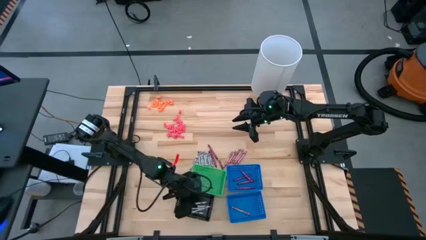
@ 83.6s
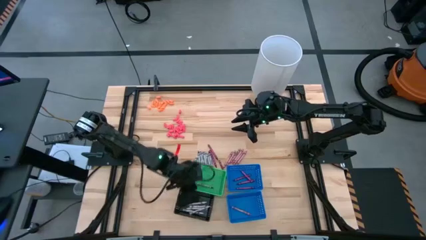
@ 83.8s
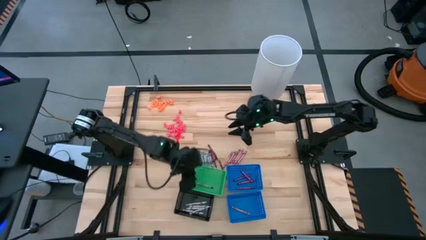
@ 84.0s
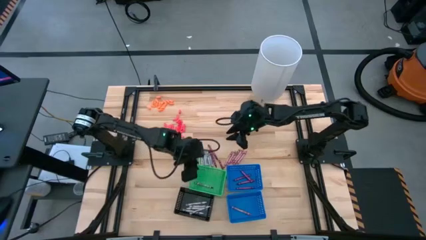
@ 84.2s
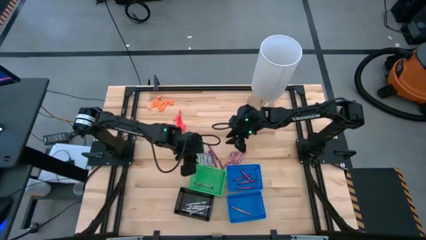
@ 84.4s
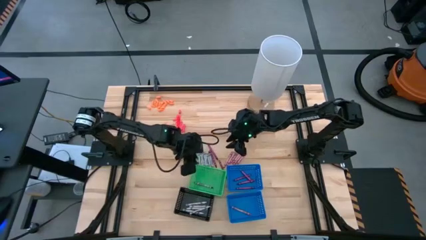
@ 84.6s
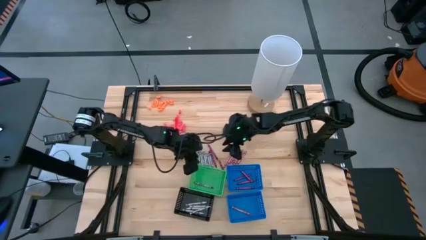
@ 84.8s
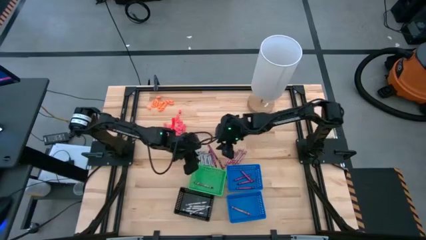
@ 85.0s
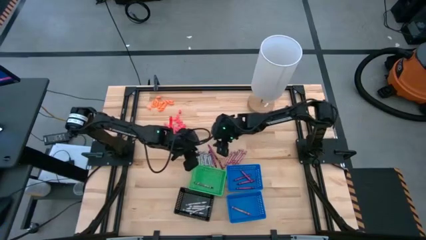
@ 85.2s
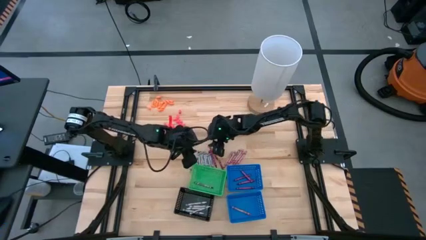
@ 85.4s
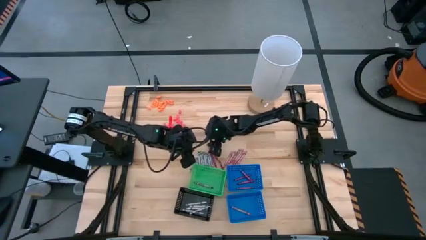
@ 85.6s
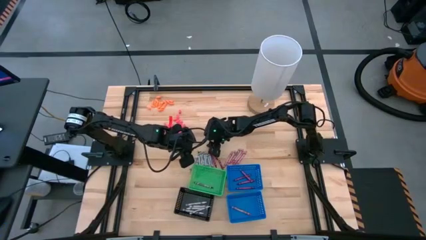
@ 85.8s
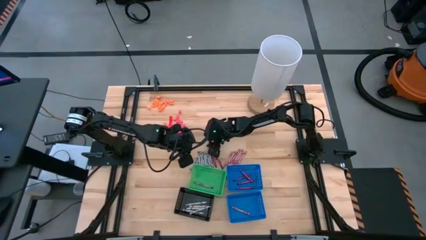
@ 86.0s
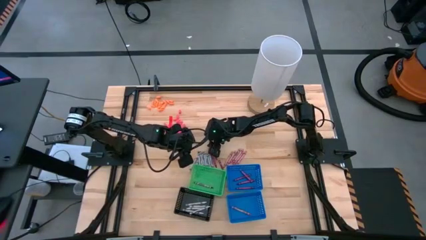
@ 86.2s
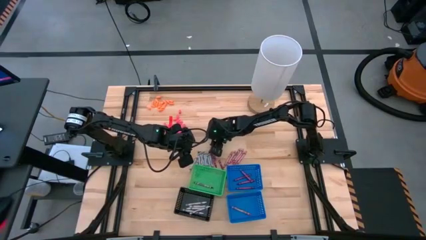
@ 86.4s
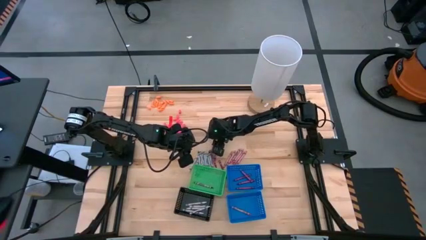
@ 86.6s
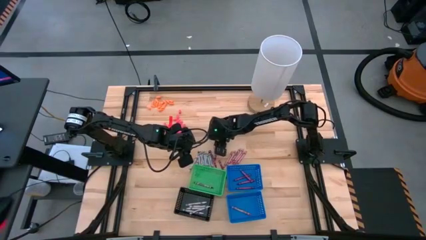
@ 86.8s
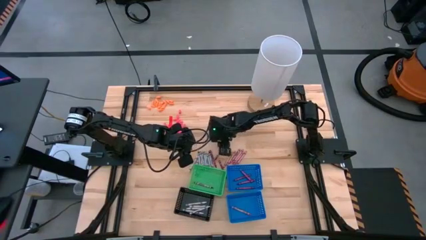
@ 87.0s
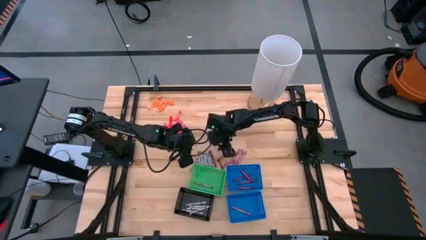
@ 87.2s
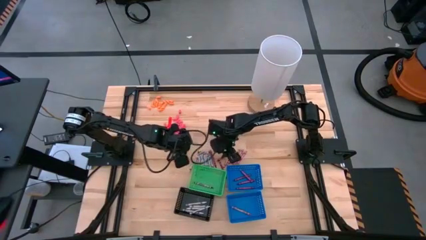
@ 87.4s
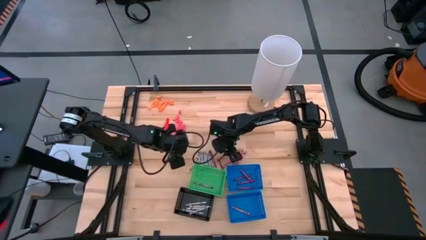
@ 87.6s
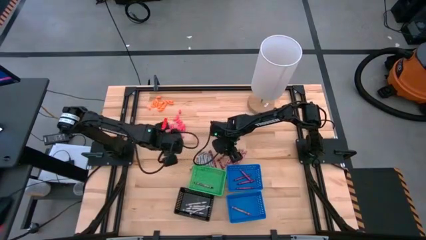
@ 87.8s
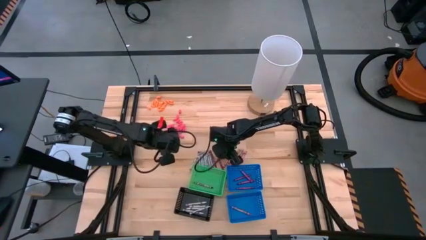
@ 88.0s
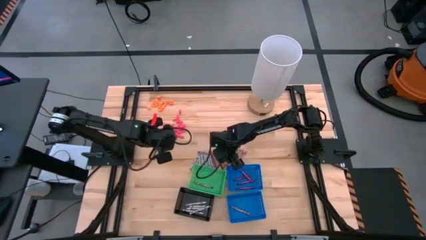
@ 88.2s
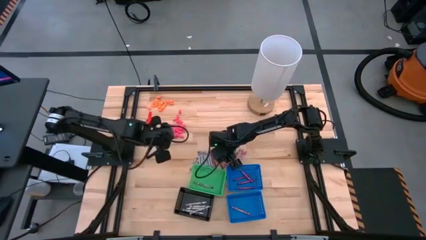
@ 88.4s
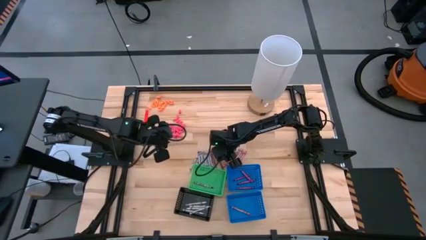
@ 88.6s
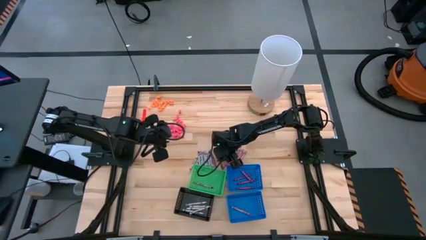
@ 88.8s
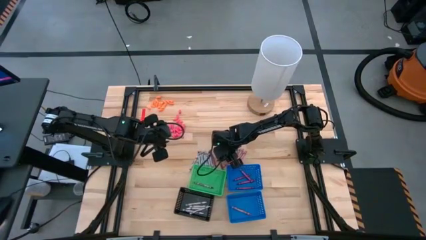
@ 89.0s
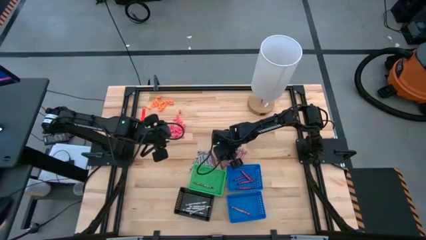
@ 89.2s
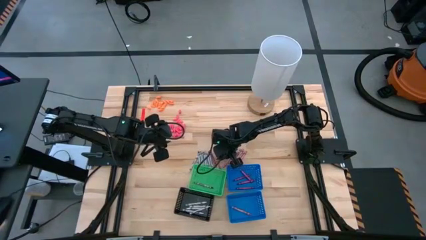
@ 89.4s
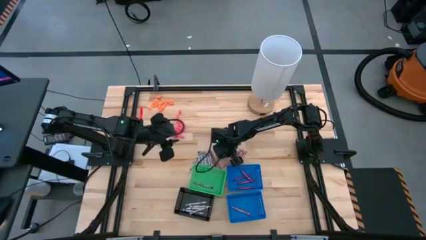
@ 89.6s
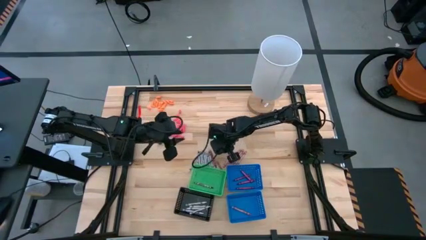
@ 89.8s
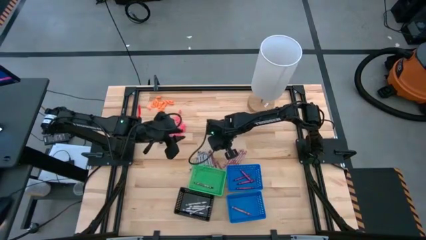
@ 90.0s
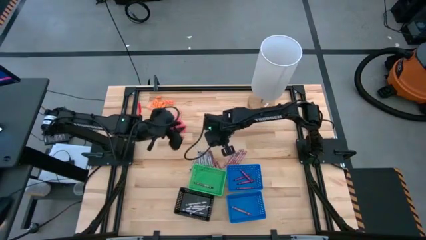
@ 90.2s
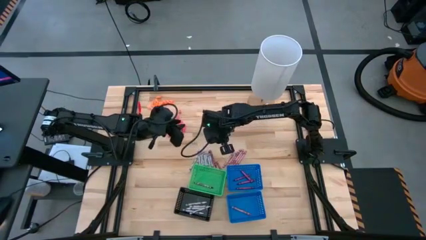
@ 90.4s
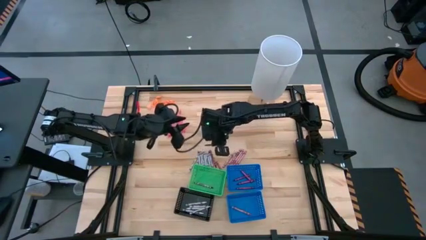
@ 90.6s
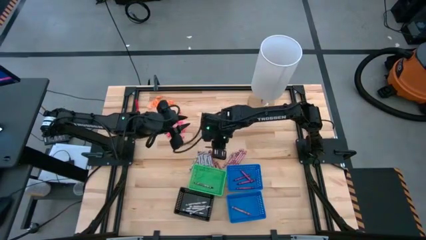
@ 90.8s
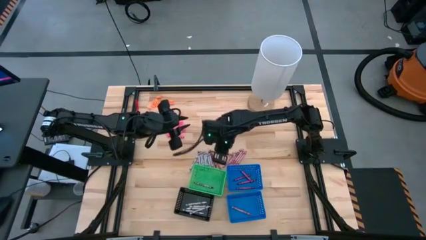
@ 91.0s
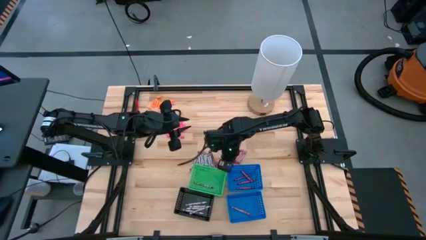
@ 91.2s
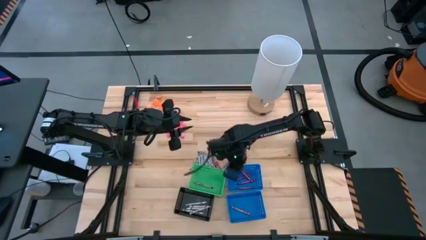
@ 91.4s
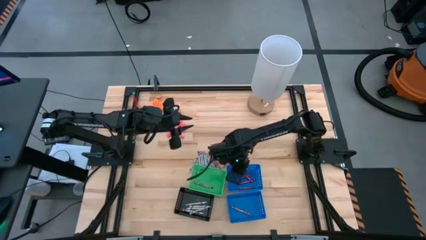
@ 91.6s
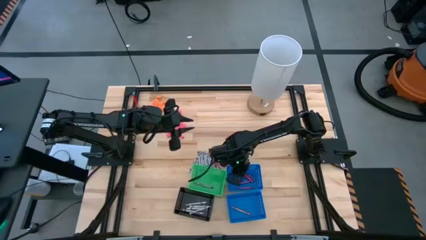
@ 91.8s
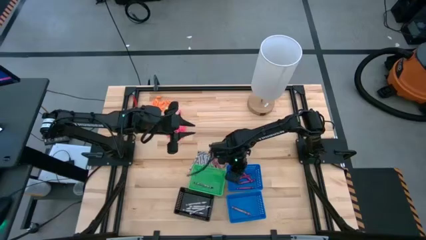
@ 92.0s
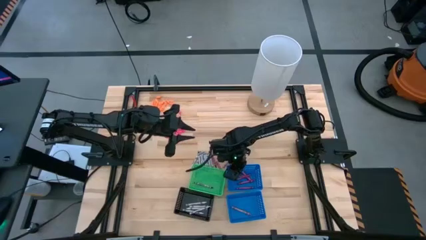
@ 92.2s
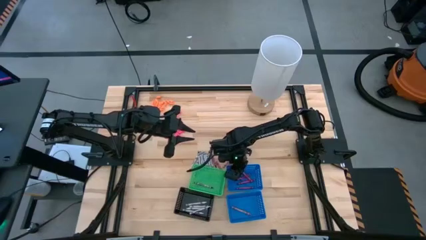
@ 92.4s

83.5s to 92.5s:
Task: Sort crayons
Put the violet crayon into the top blue bin

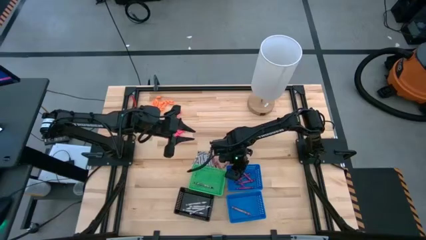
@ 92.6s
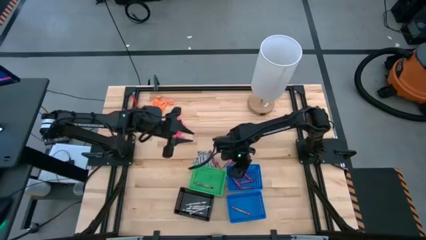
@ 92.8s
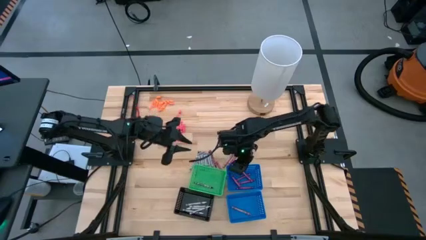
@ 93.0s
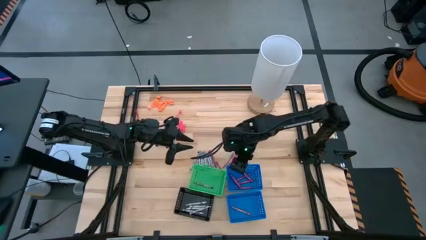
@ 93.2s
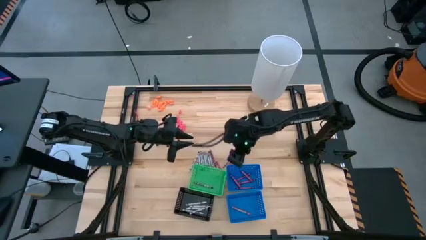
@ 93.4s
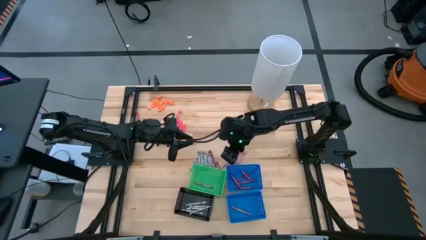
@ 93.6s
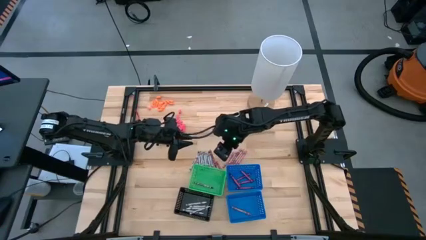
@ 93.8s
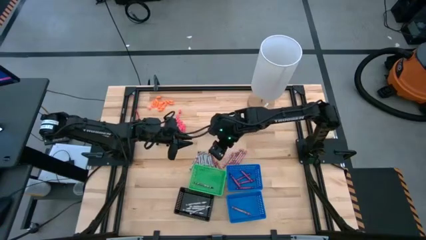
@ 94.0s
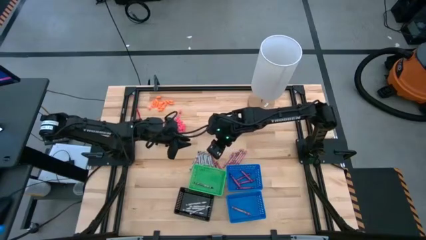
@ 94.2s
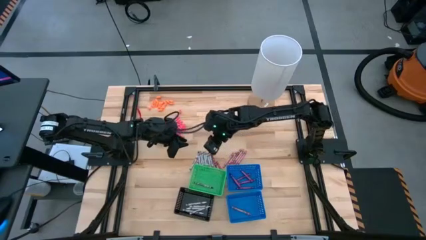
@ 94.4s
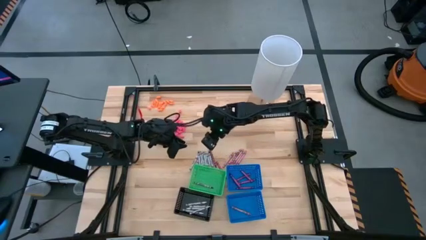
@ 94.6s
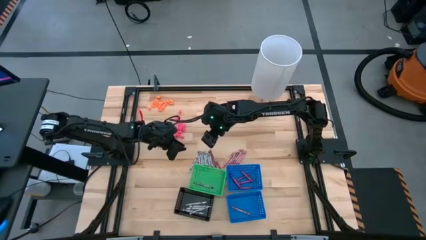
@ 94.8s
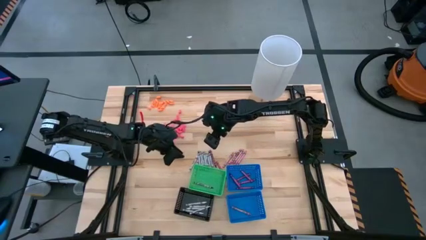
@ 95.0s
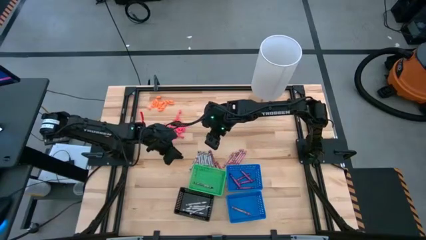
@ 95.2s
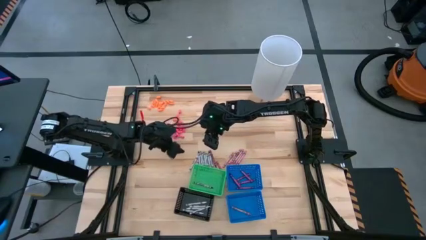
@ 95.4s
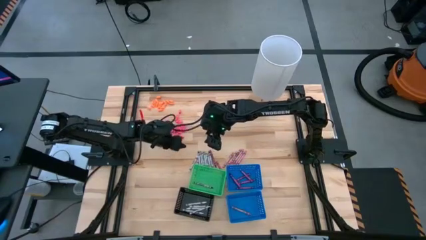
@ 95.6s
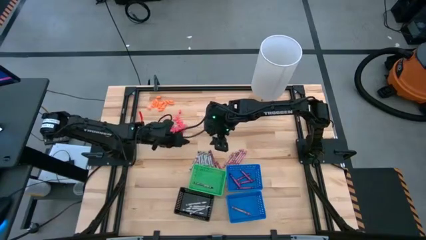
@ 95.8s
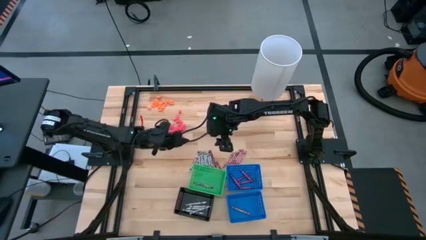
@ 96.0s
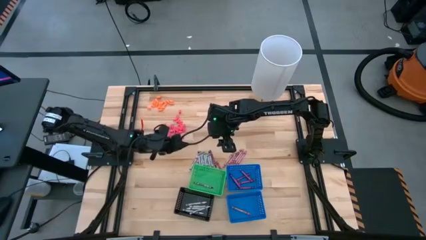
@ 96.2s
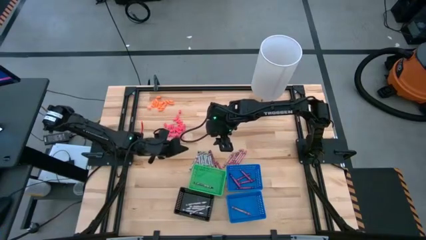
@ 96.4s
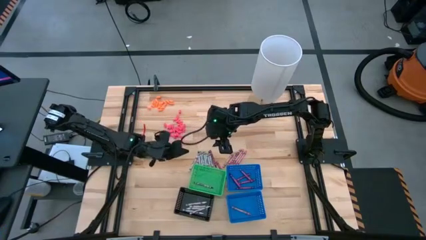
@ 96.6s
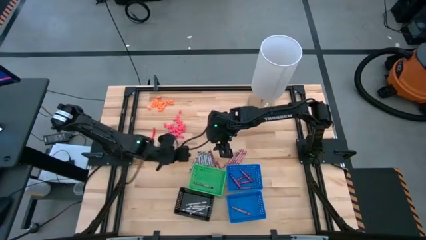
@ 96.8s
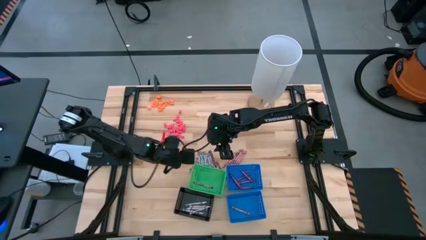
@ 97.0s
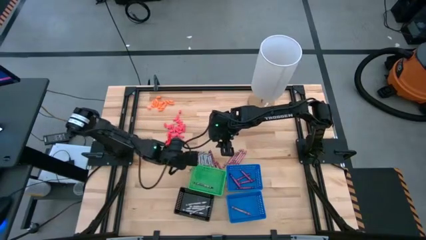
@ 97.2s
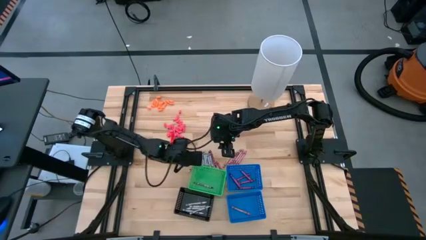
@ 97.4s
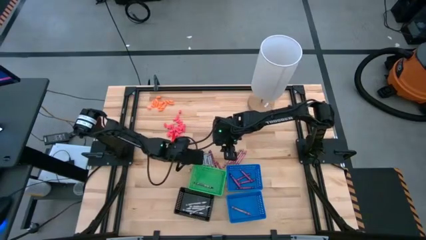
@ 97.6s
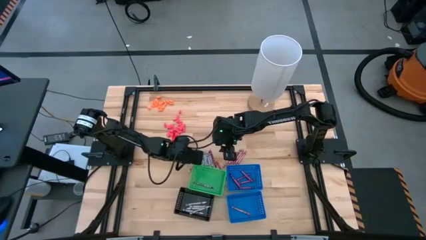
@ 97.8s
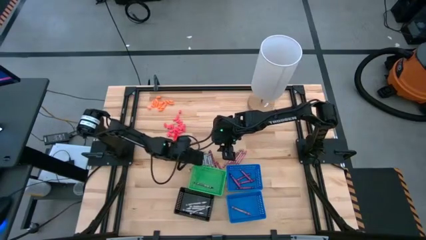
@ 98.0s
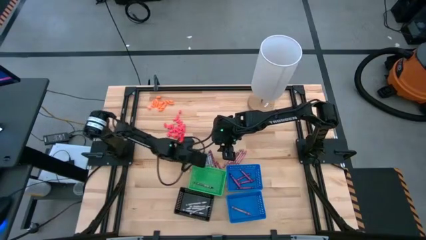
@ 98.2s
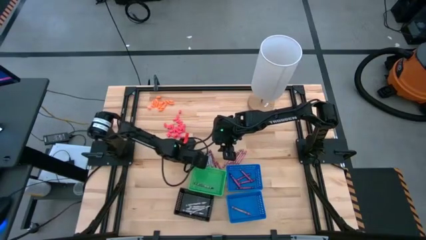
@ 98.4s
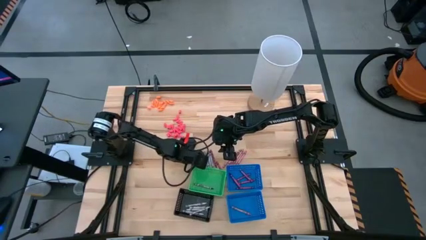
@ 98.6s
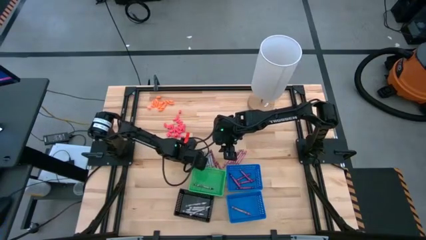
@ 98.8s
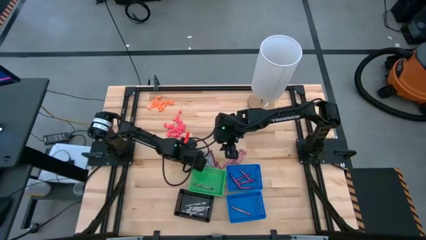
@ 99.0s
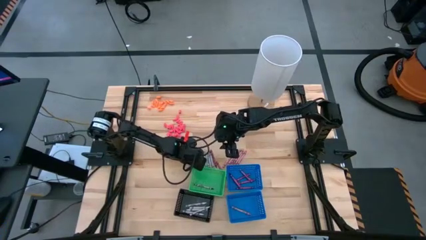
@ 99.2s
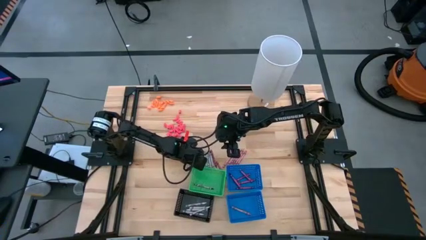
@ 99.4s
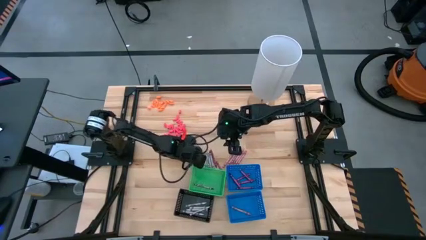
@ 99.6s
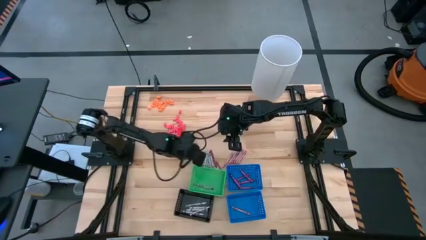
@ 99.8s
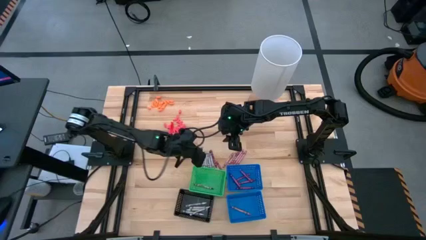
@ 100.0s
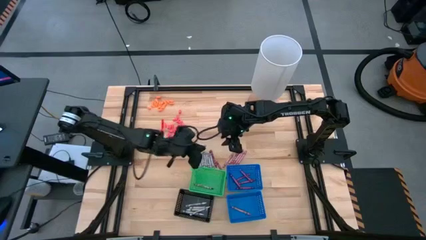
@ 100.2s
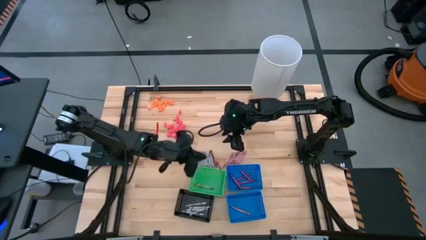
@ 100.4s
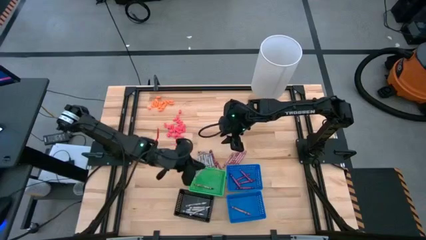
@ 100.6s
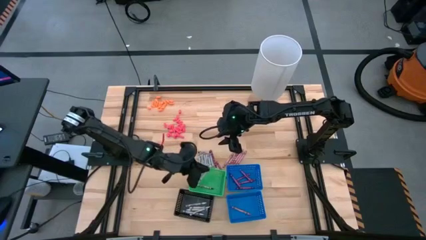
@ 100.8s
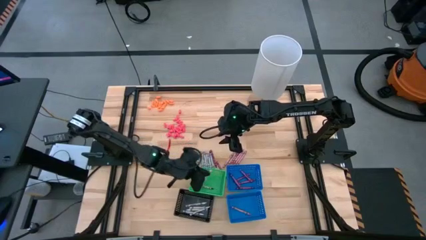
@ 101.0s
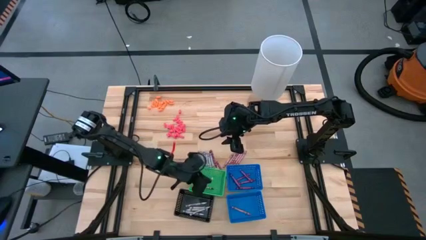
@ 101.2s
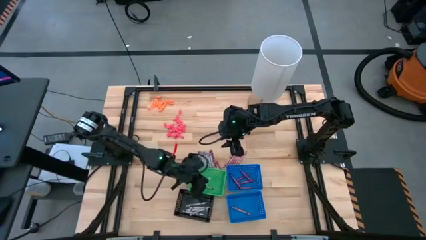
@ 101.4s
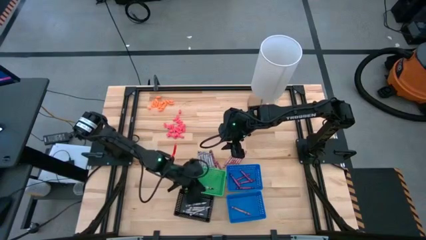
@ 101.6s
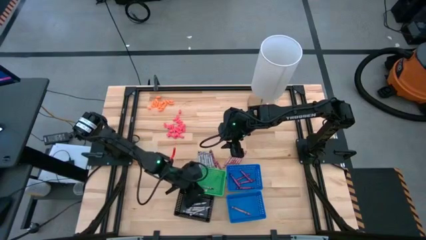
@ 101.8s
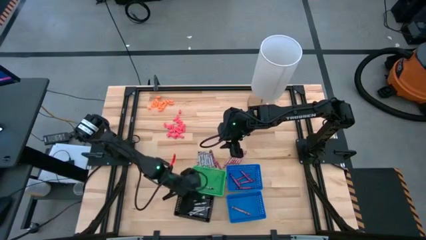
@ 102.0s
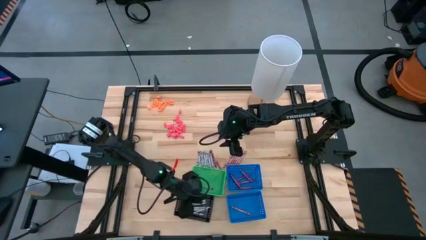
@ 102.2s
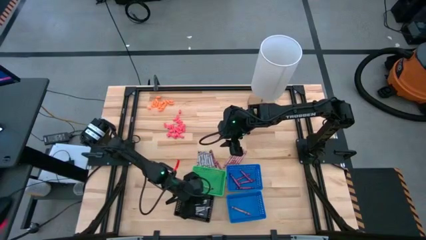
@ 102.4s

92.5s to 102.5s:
Put the white crayon into the black bin
